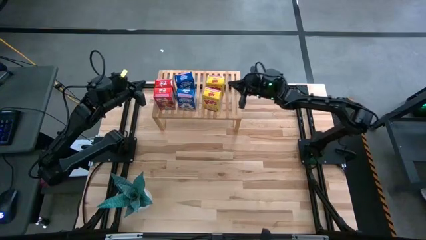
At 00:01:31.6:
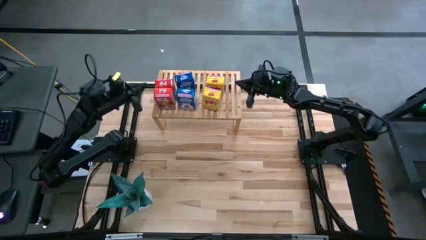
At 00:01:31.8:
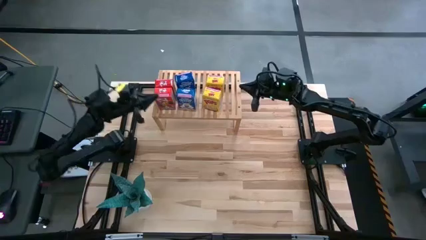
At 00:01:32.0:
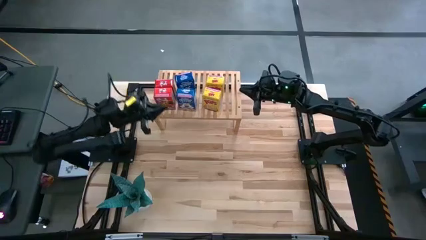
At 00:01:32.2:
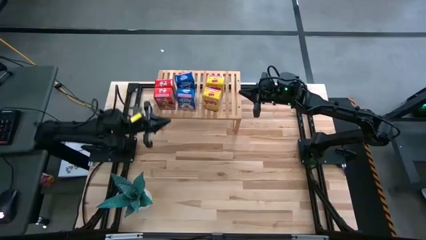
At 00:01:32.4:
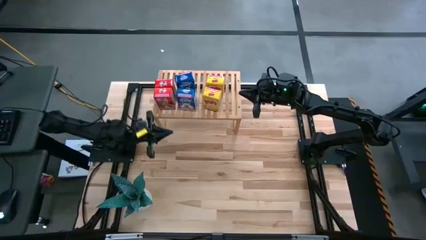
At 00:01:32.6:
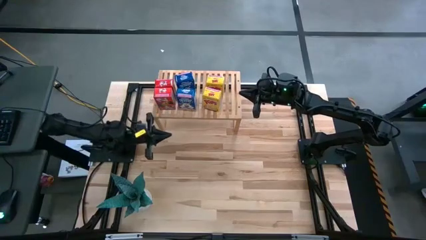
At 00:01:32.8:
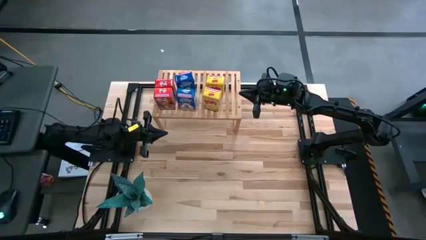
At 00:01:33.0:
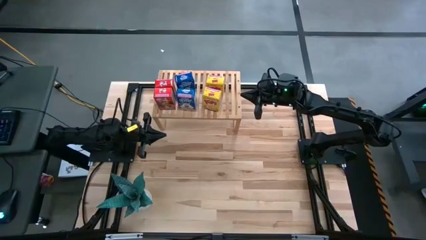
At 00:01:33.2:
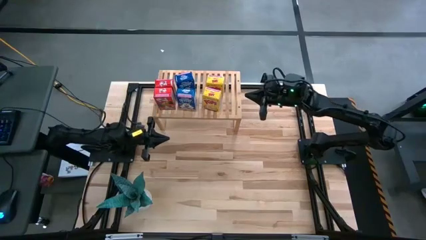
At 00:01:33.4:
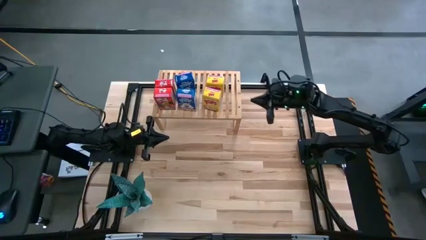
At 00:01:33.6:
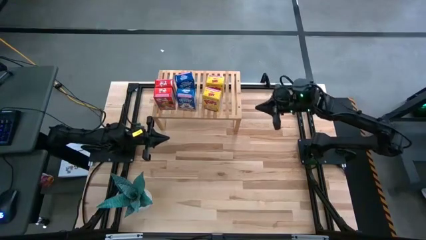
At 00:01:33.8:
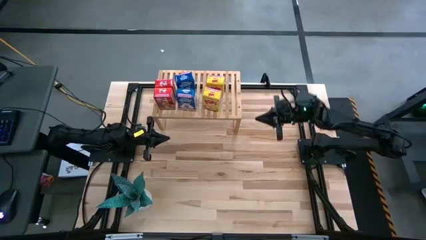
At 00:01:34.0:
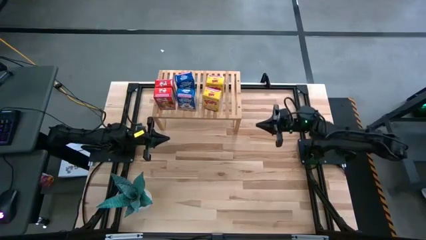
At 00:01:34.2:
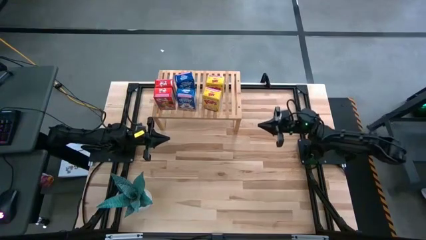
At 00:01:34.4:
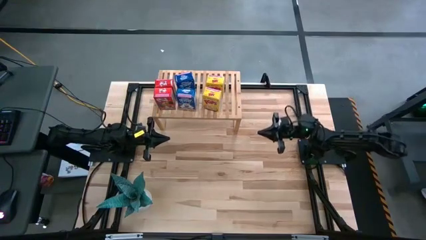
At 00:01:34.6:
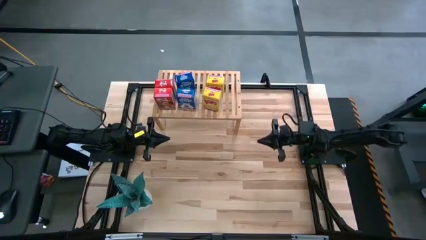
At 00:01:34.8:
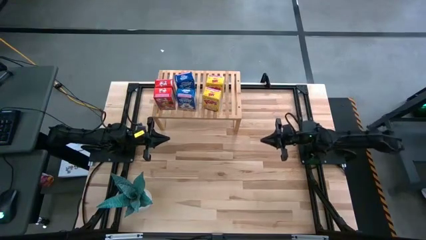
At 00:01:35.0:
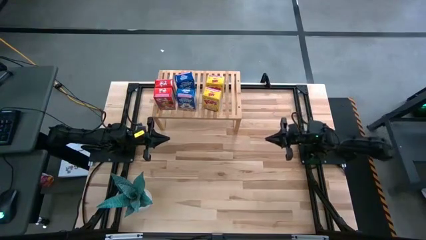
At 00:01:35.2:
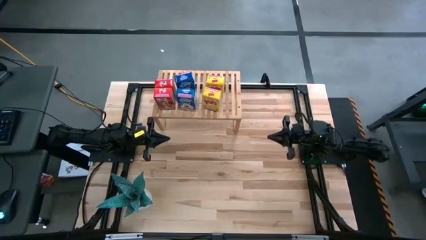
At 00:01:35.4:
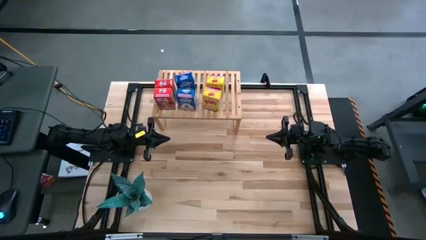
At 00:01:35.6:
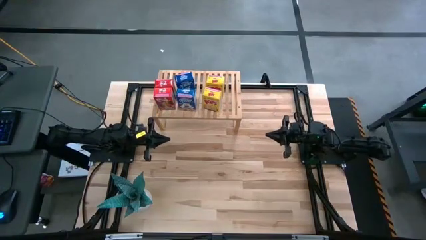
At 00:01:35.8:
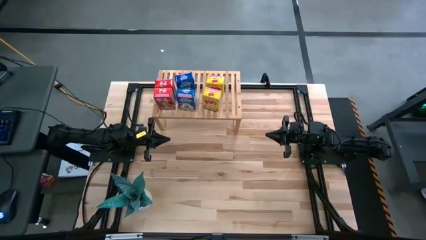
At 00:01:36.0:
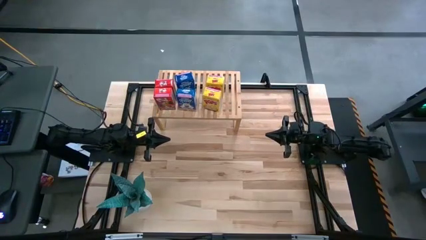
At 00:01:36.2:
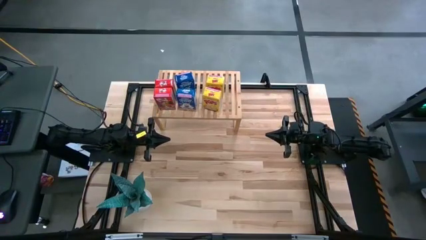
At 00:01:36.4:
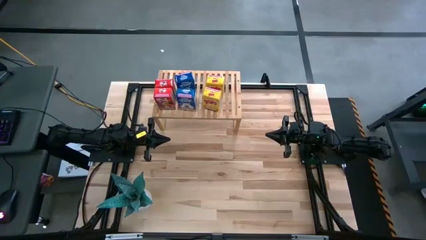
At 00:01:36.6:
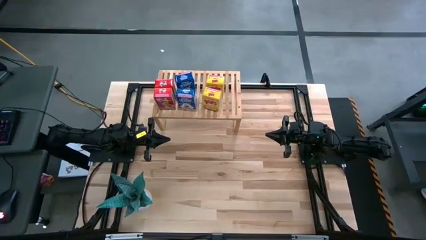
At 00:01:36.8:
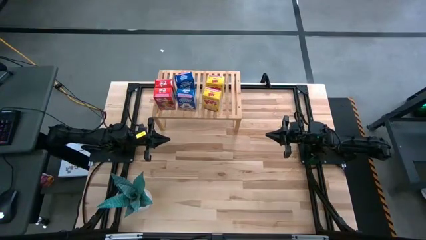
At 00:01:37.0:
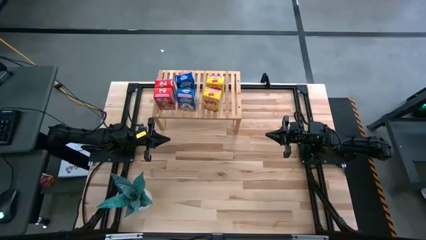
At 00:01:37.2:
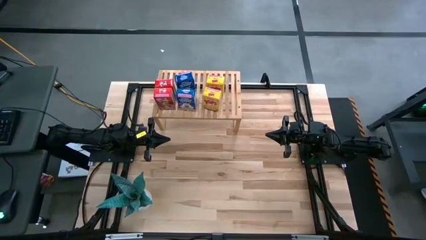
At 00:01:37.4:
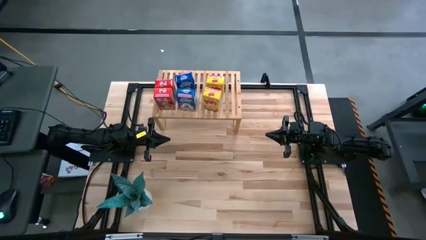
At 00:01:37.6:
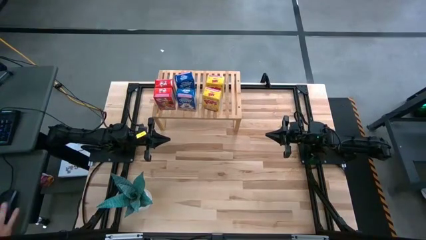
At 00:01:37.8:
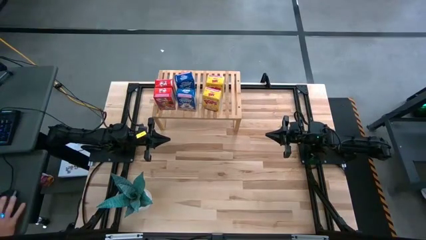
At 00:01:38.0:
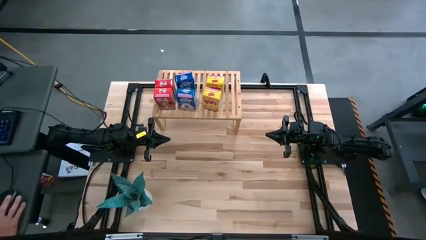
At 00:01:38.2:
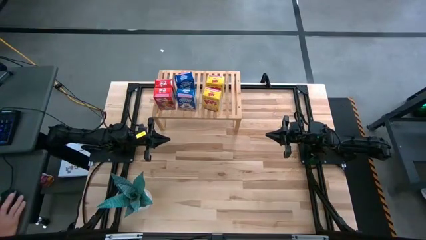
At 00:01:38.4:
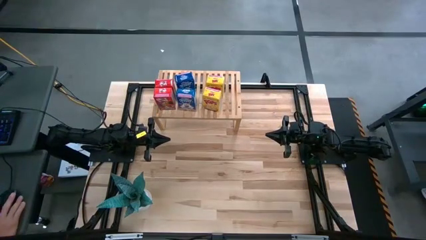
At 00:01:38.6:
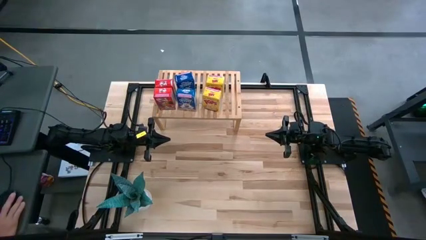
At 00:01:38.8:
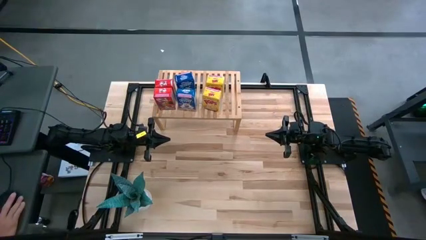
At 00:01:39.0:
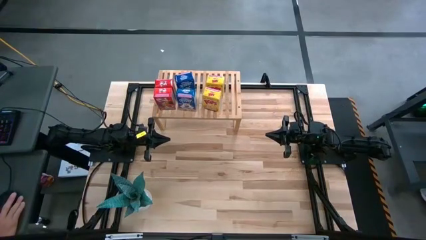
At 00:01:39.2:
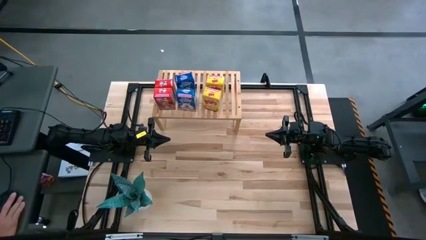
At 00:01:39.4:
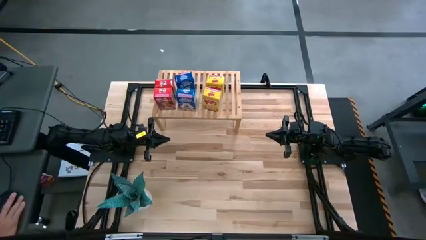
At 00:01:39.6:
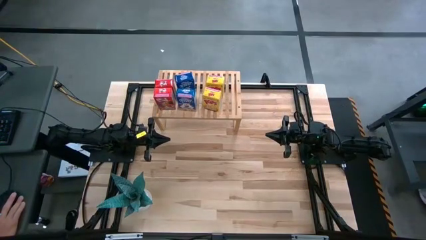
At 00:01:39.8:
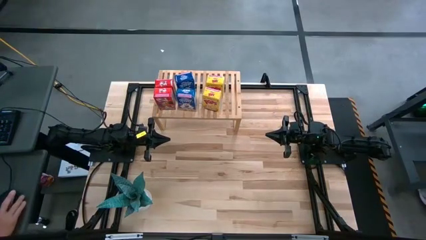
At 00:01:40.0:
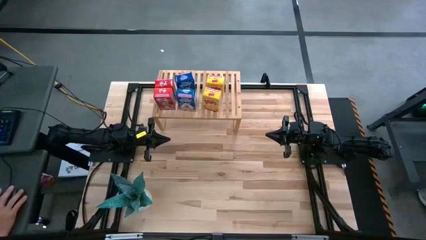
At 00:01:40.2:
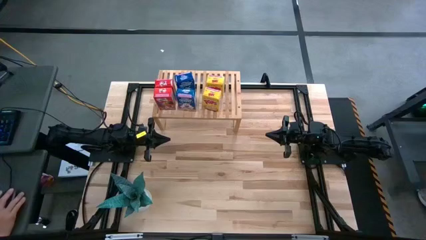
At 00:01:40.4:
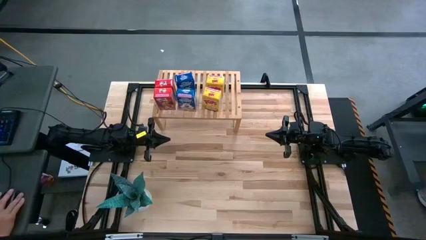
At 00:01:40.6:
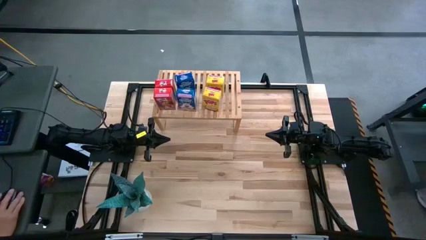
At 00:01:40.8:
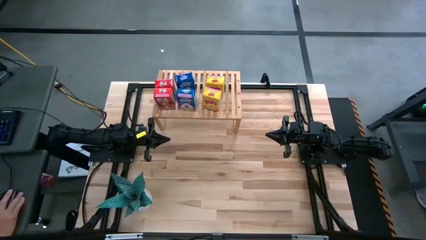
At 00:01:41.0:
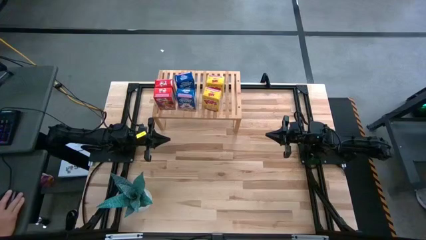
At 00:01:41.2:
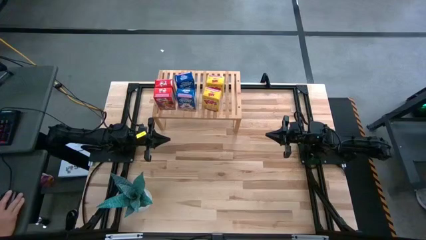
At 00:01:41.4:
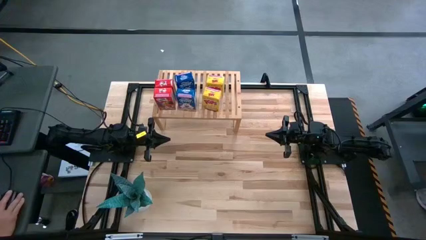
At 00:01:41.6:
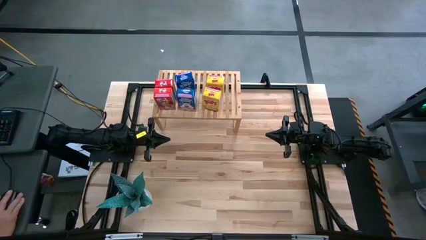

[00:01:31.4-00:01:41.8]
Task: Stack cereal on shelf
Return to Home Position
